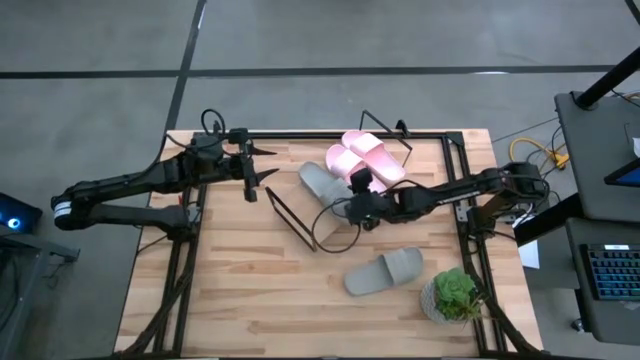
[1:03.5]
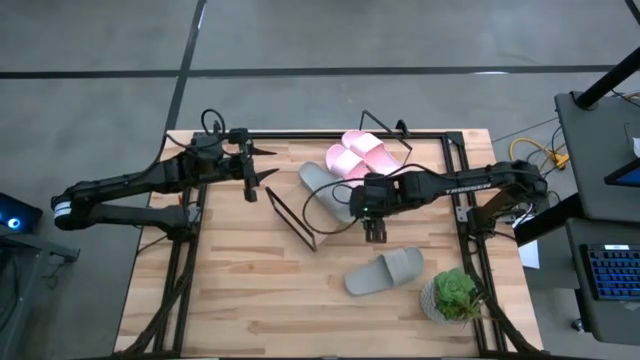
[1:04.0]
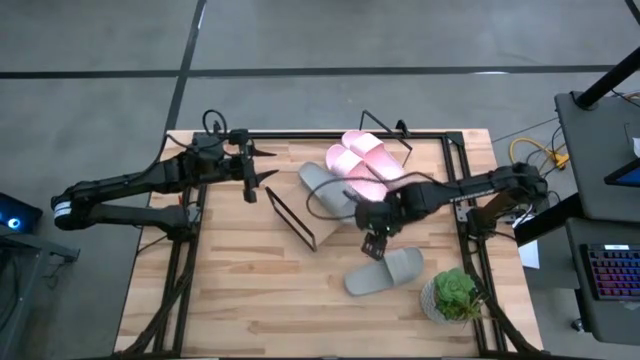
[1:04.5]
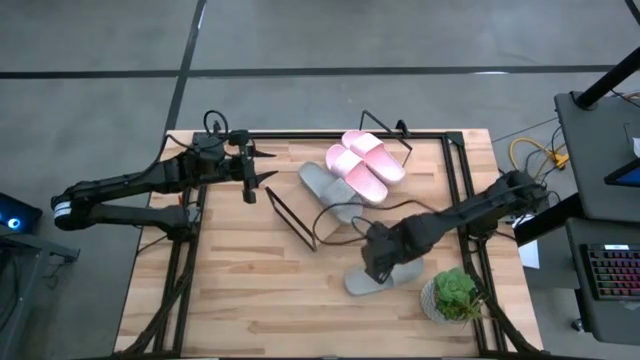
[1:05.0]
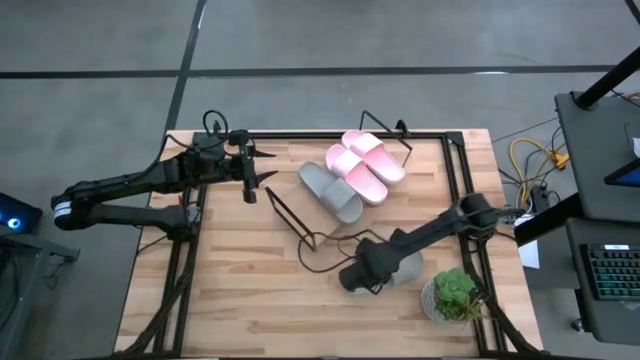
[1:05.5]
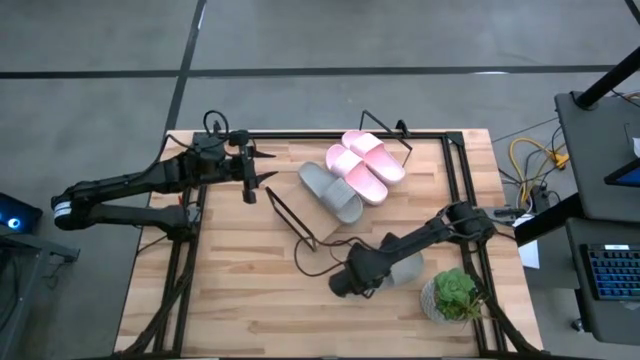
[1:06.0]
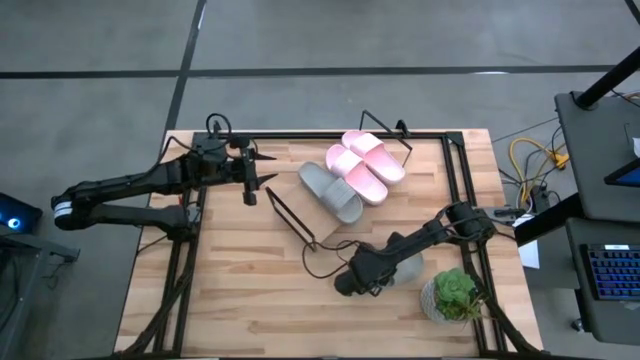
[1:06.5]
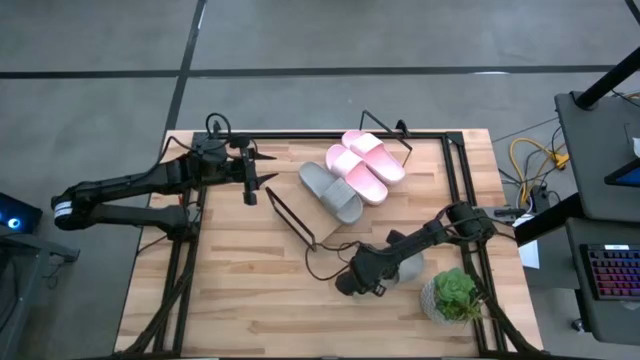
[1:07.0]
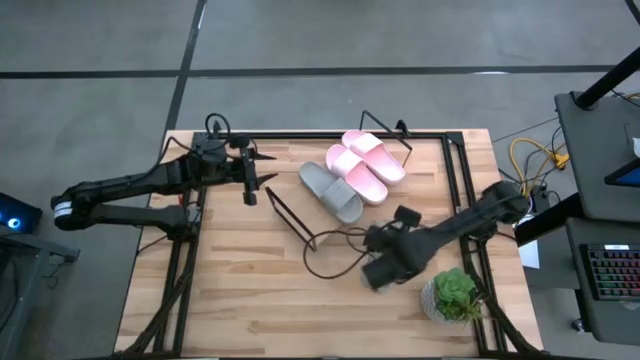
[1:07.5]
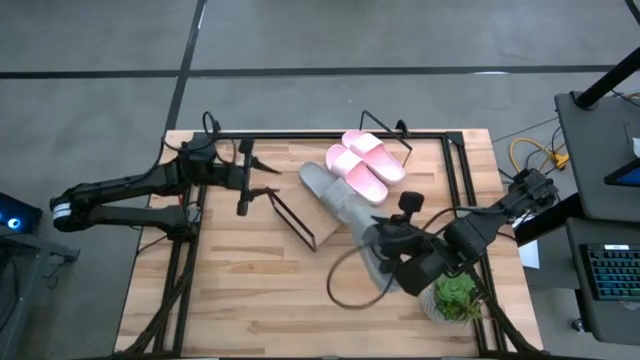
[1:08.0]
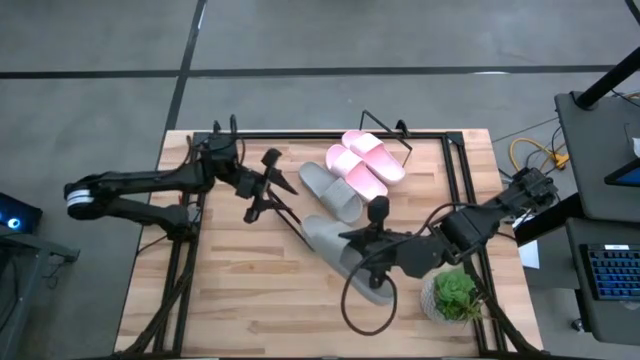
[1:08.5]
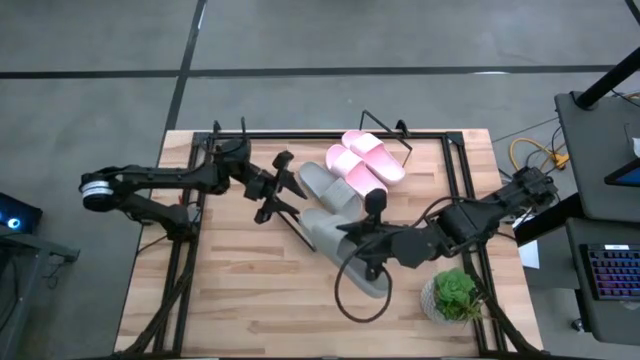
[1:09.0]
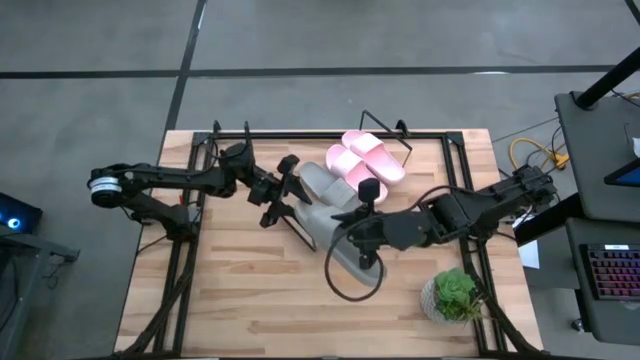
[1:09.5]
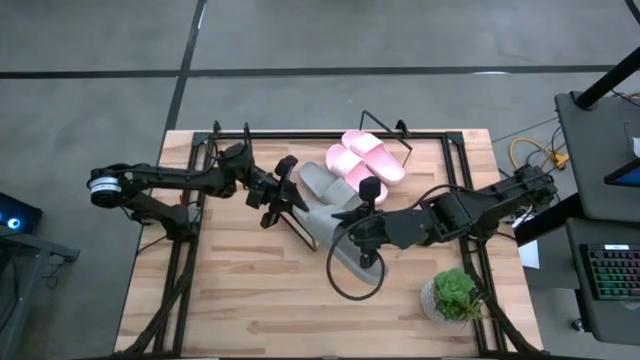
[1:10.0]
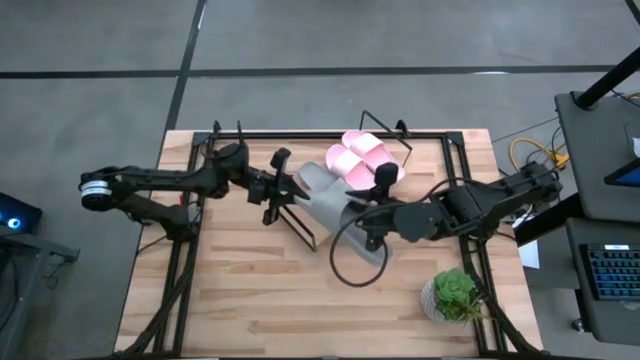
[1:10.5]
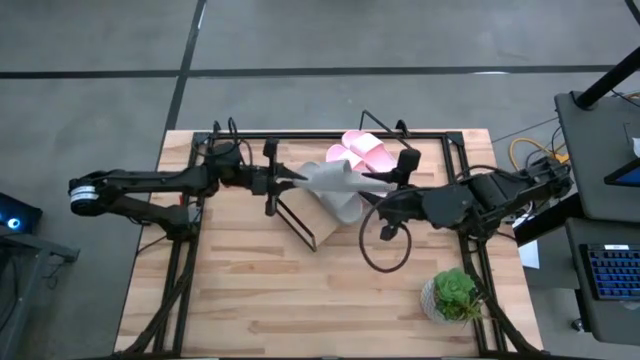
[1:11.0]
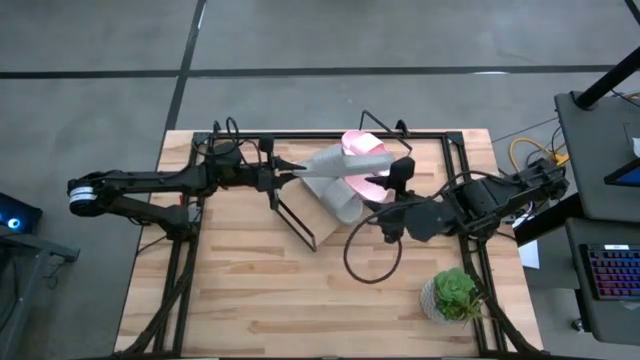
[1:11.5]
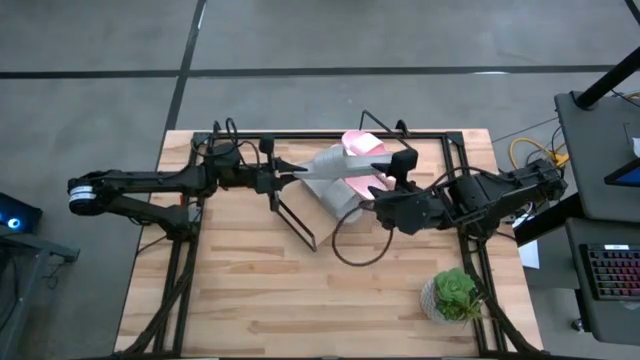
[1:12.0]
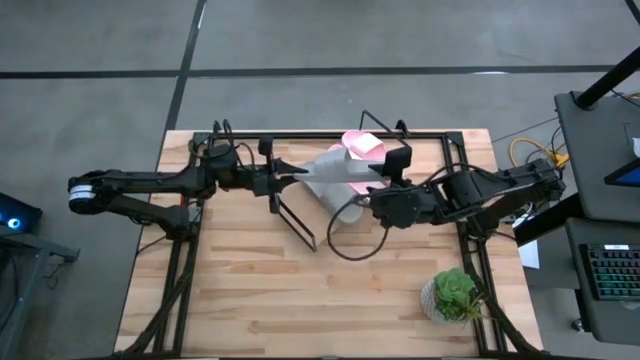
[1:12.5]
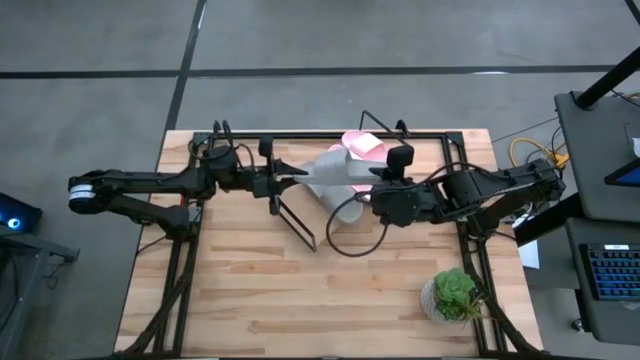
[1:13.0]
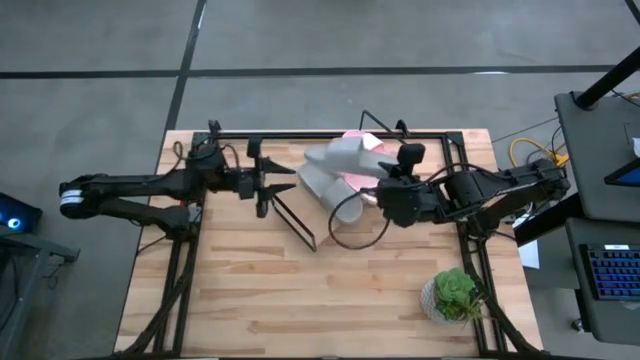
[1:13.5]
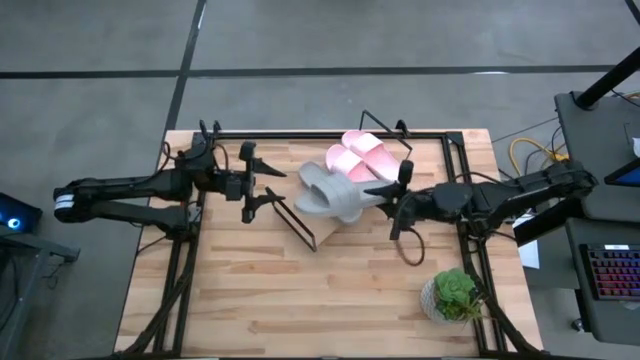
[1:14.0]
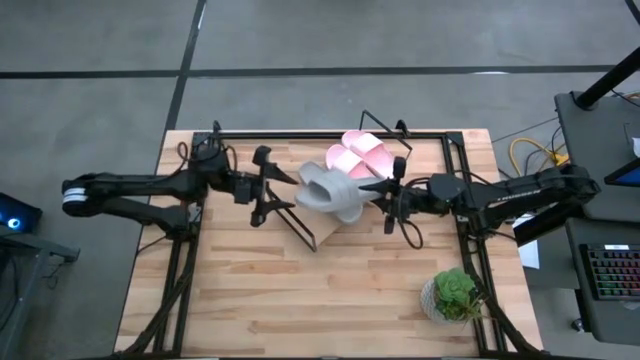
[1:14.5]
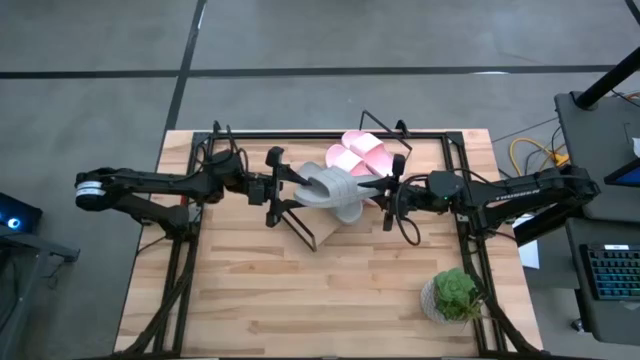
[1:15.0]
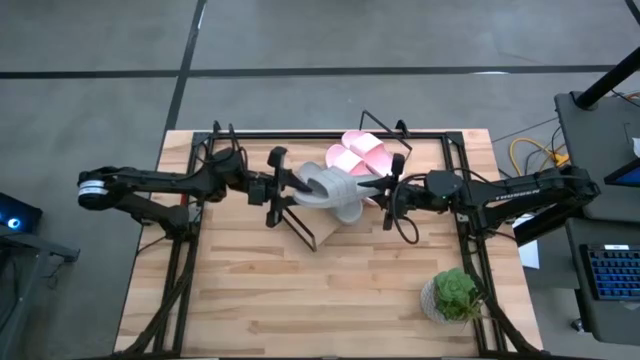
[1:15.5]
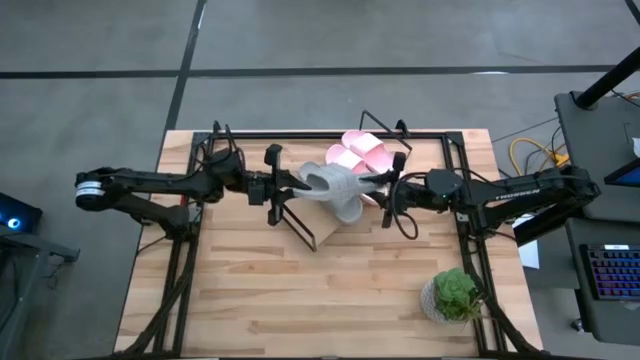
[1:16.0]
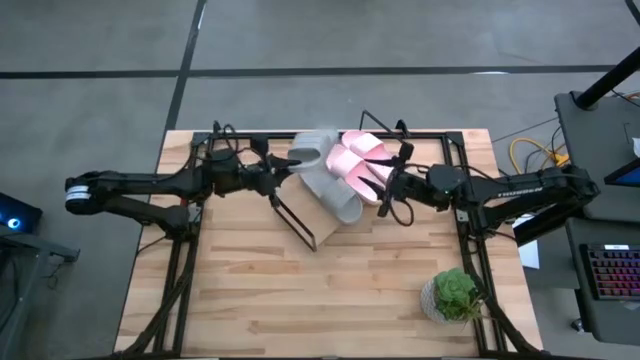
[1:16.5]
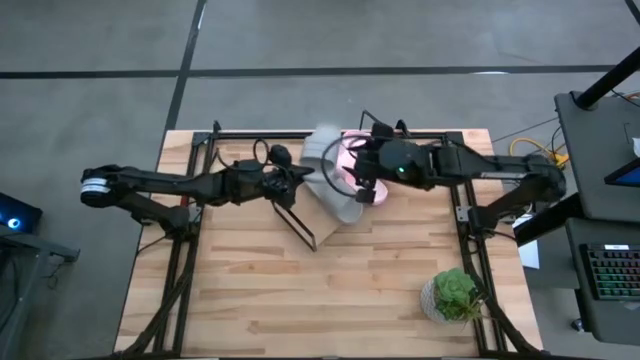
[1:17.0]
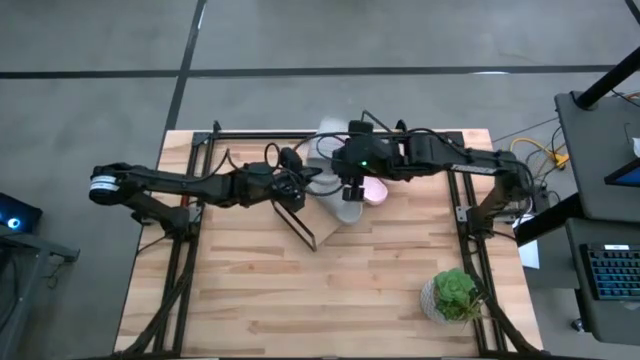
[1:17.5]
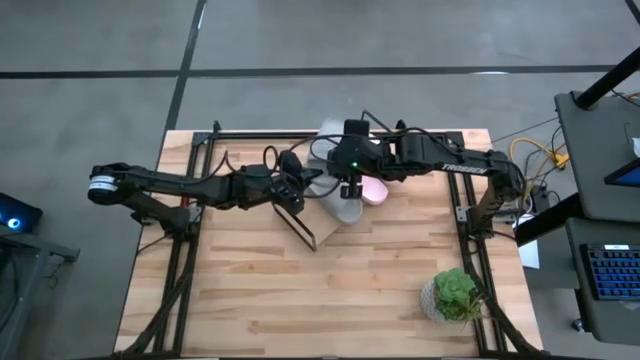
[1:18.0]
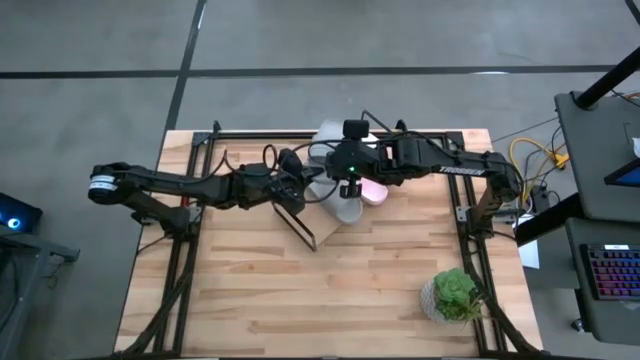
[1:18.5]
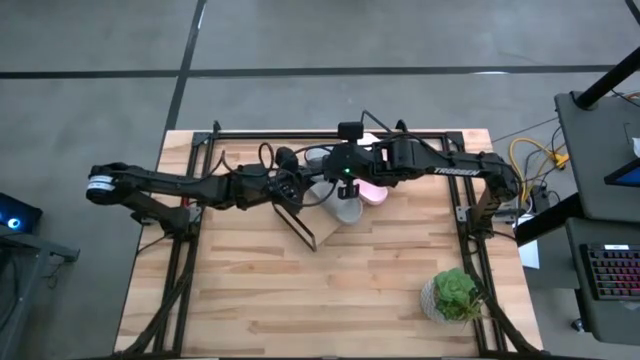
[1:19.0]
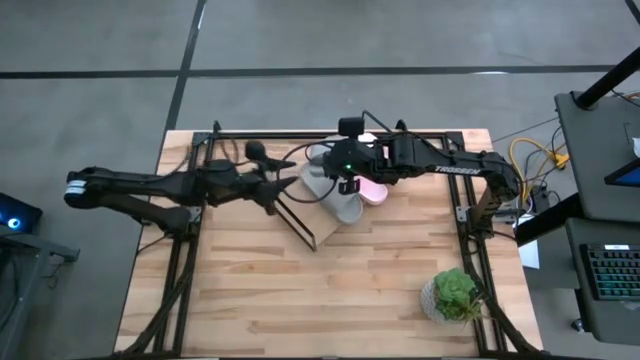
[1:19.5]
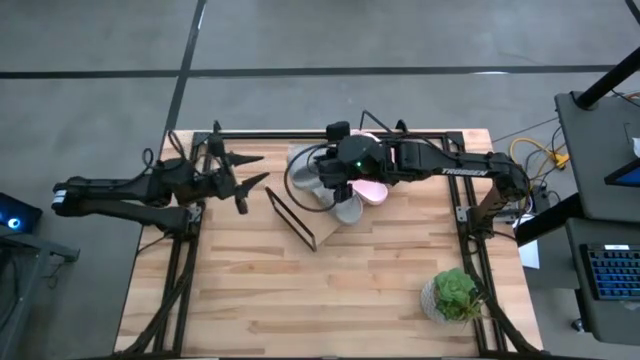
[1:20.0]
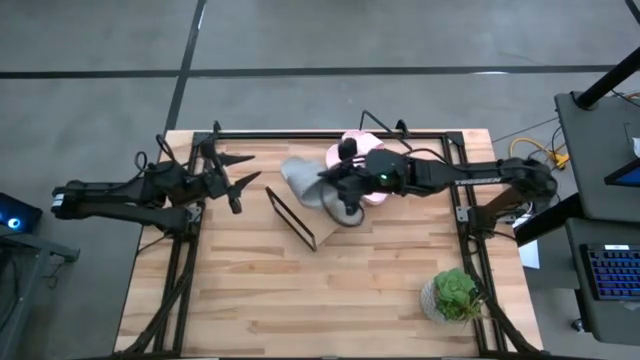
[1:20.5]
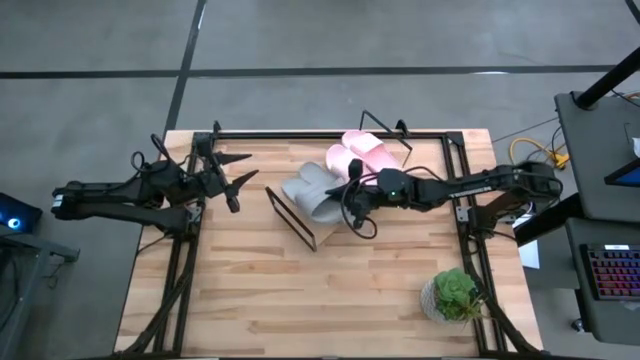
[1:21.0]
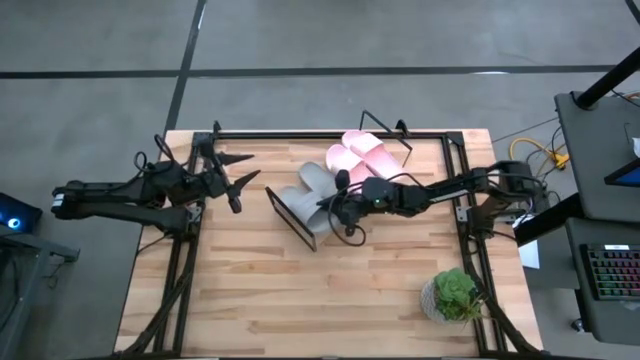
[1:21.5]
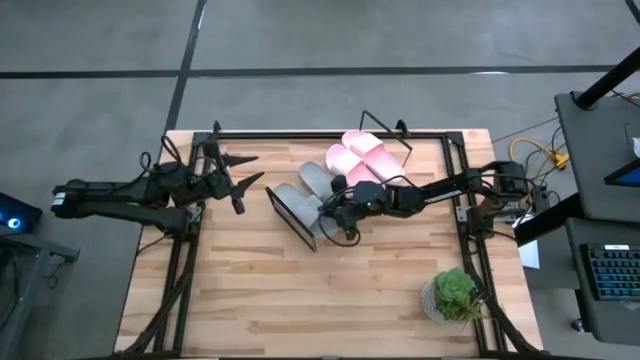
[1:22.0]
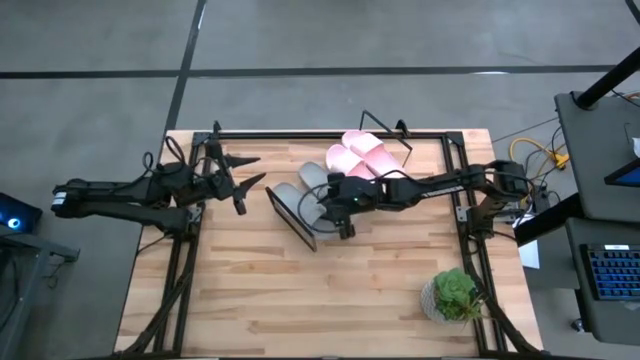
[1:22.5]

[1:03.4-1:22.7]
Task: Pick and place slides into the shelf
Put the gray slide on the shelf

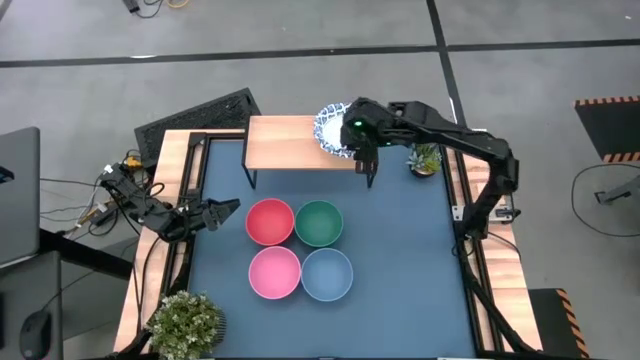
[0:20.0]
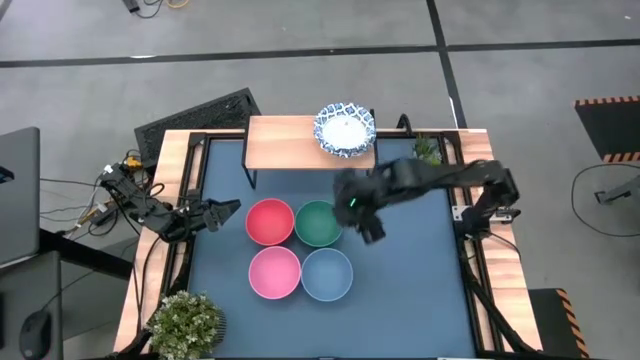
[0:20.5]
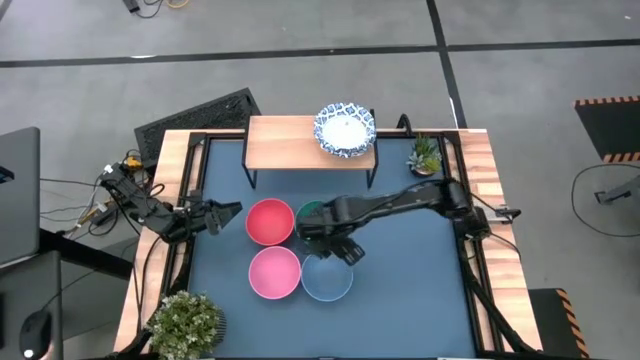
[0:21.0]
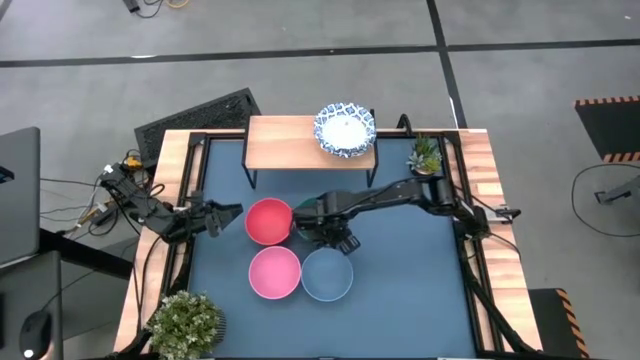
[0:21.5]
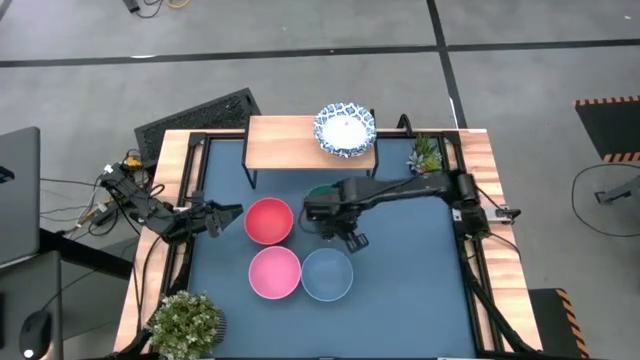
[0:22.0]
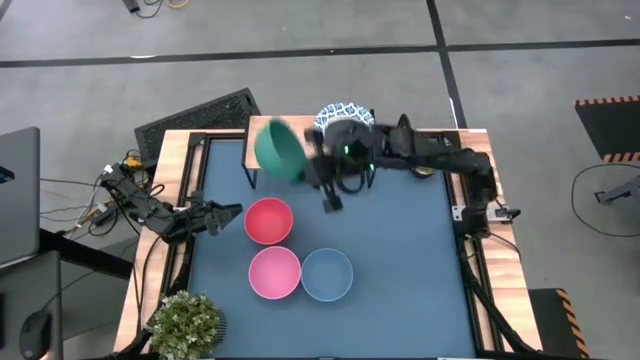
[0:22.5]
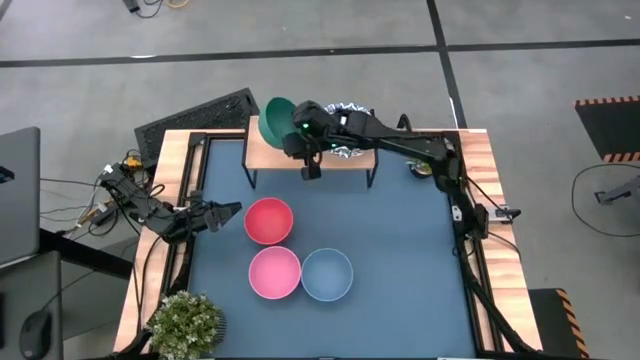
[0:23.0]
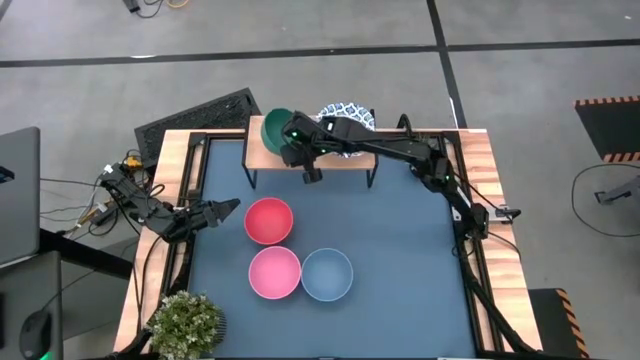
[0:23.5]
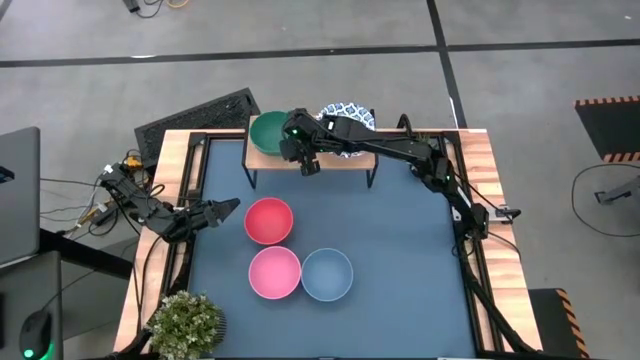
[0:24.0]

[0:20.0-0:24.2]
Task: Place and stack bowls onto a shelf
Put the green bowl on the shelf
